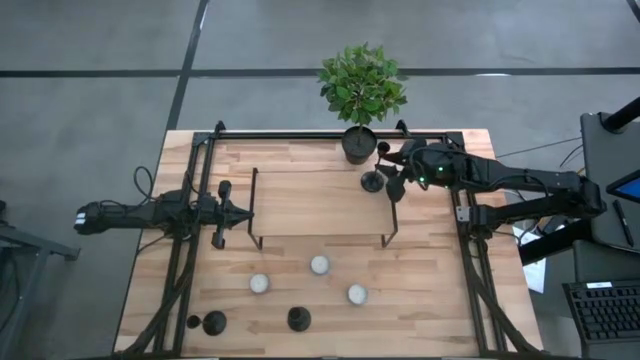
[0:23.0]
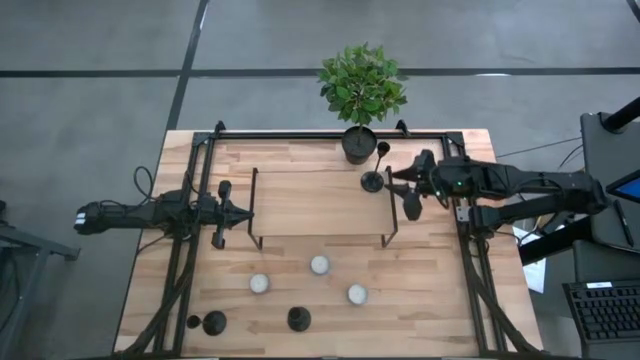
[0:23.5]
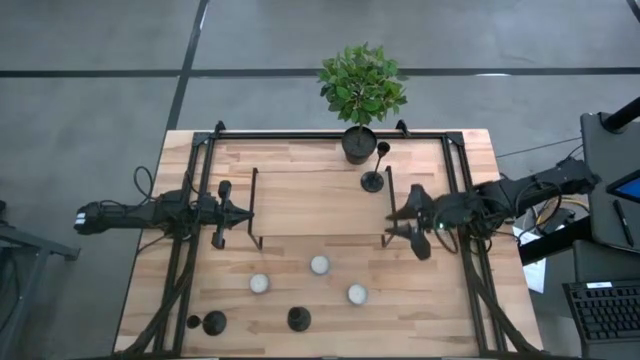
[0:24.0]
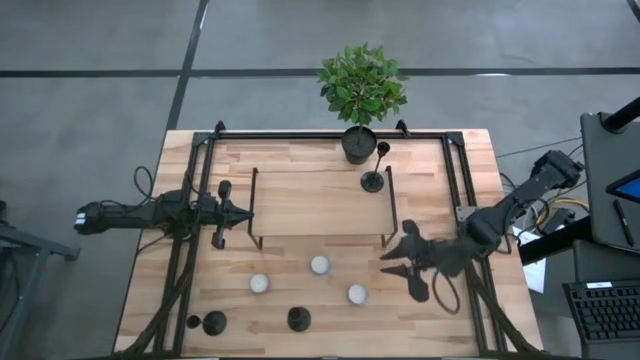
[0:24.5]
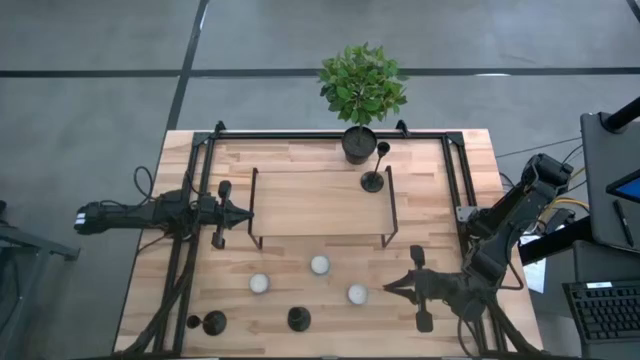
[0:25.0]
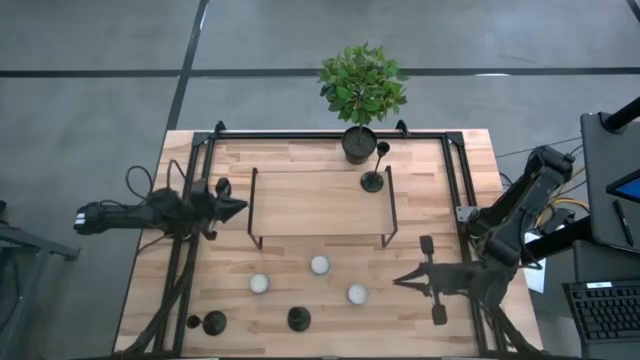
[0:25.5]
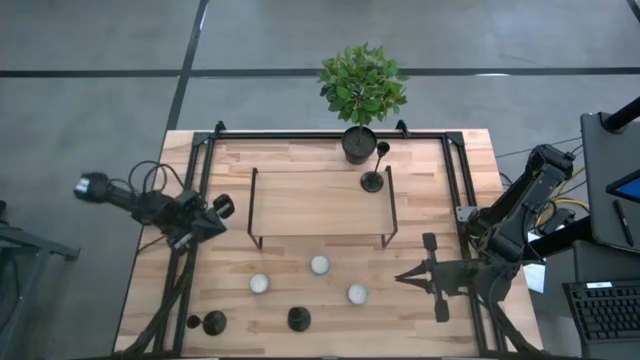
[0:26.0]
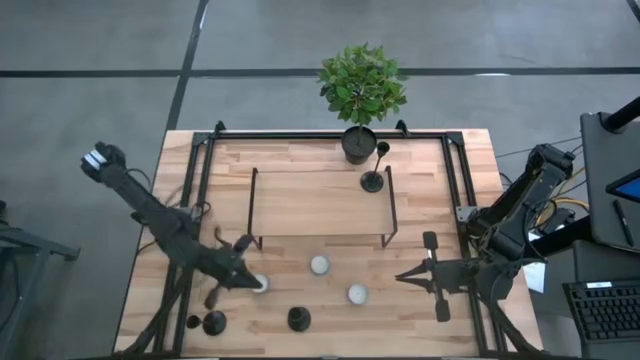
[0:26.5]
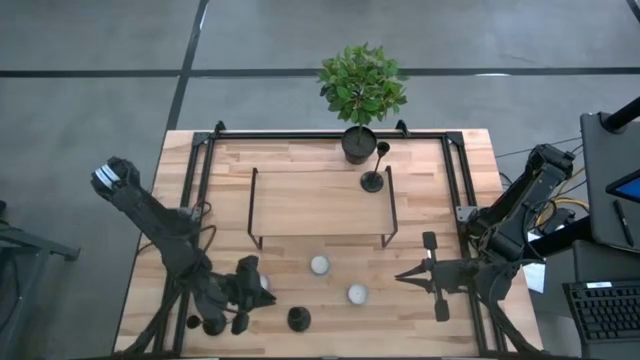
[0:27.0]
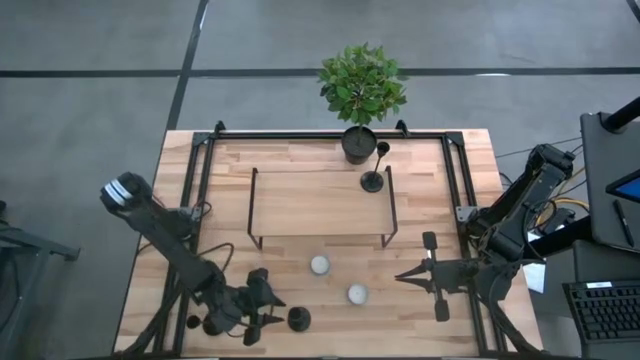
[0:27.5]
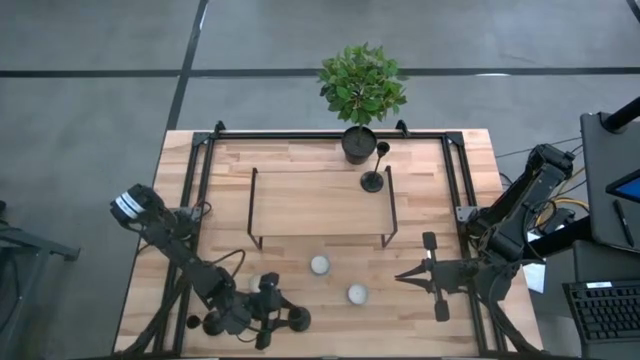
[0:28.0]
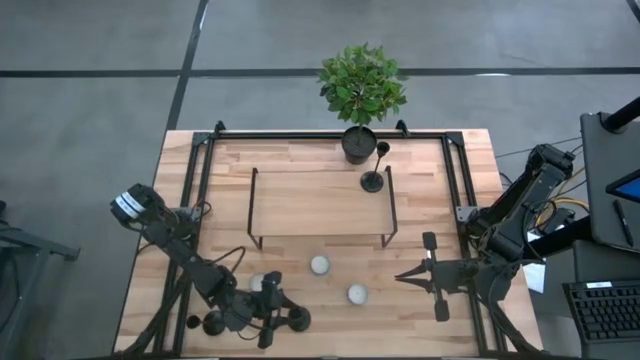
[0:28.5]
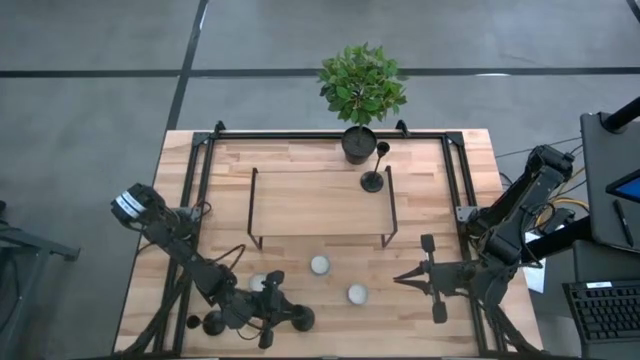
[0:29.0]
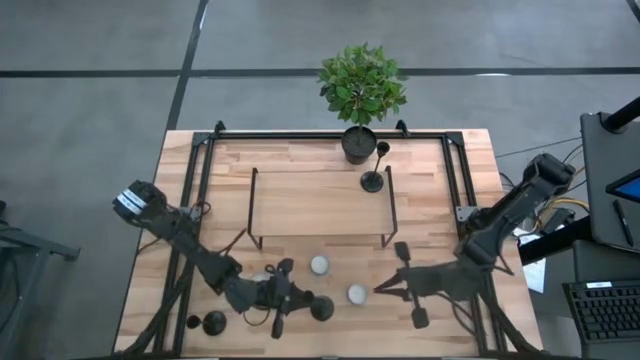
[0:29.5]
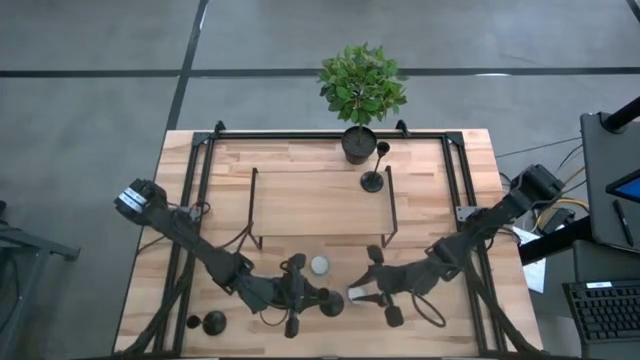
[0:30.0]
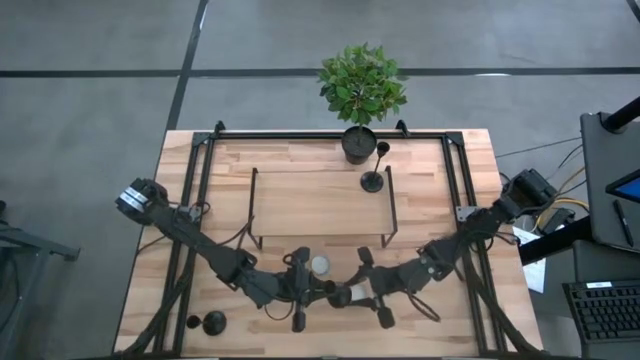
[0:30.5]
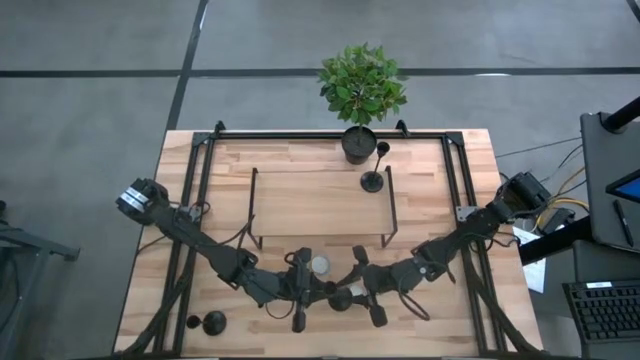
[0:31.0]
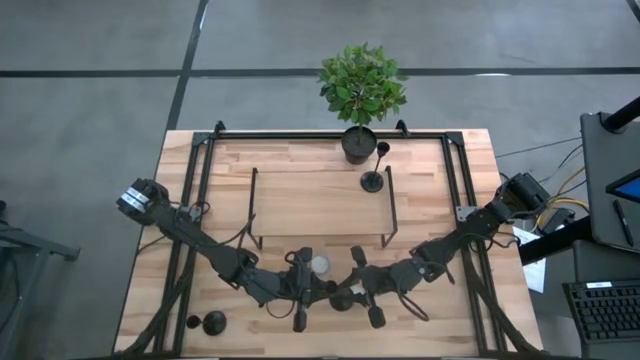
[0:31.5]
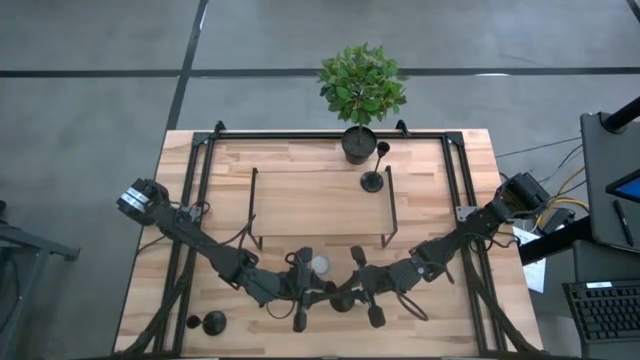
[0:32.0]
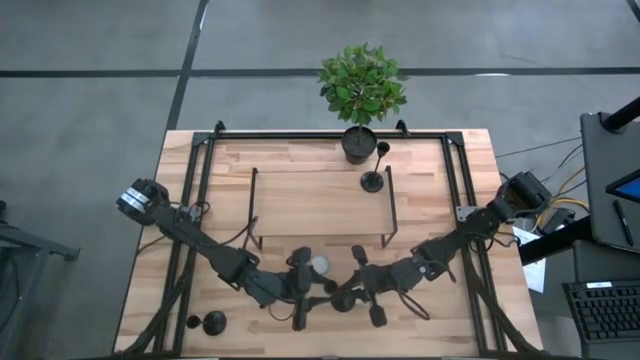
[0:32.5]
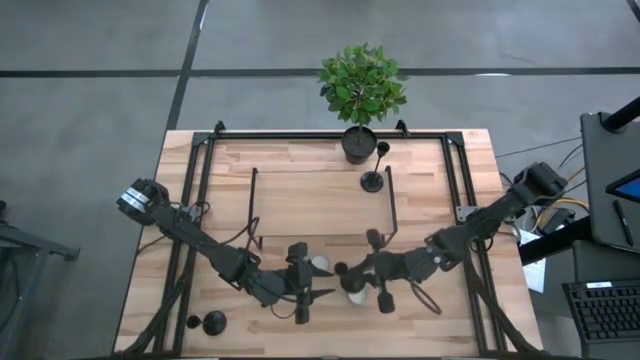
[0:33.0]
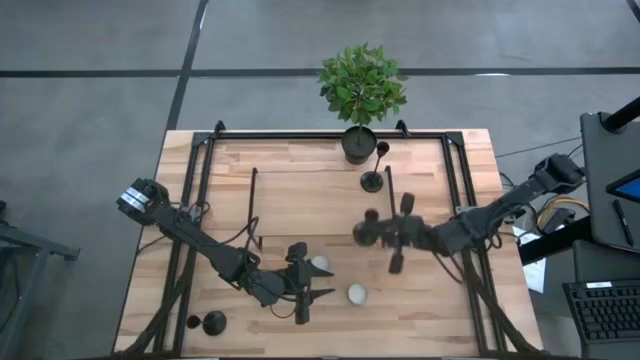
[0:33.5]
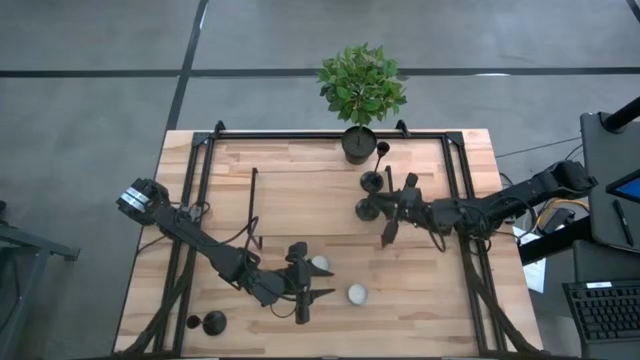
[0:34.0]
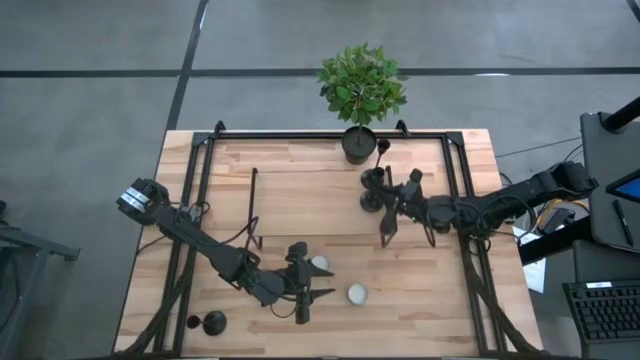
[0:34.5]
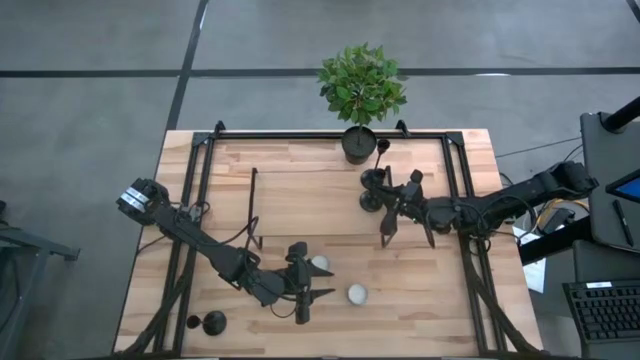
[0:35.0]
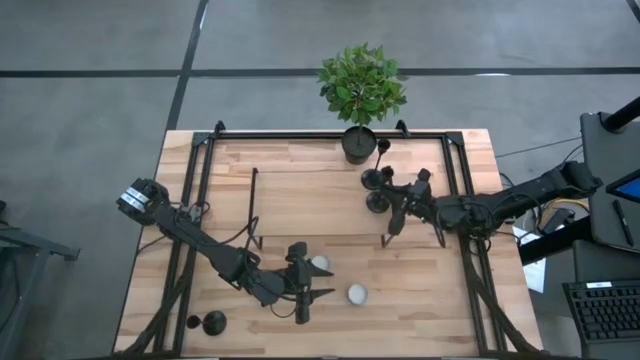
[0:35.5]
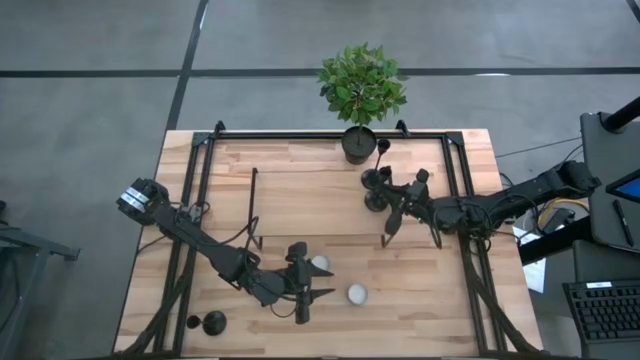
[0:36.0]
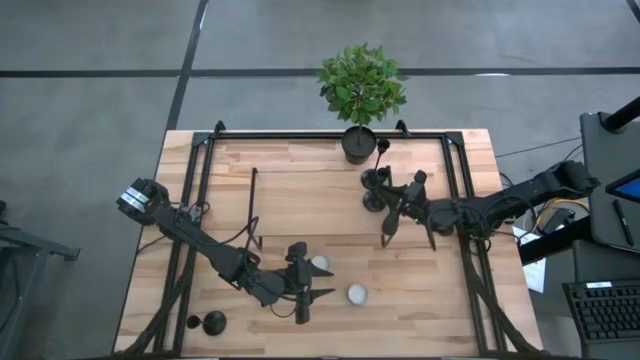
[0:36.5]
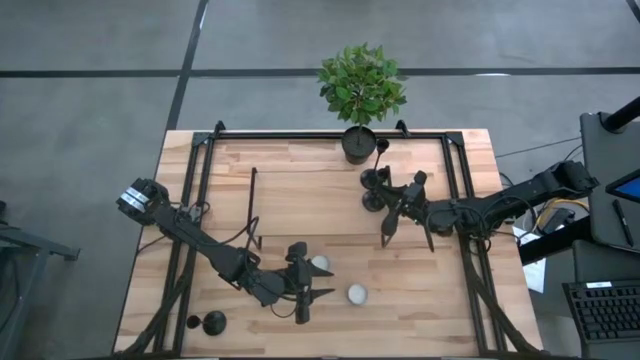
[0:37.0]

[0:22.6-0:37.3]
Task: Pick & Place candle stick holders
Put the right black candle holder on the shelf aligned with the other black candle holder

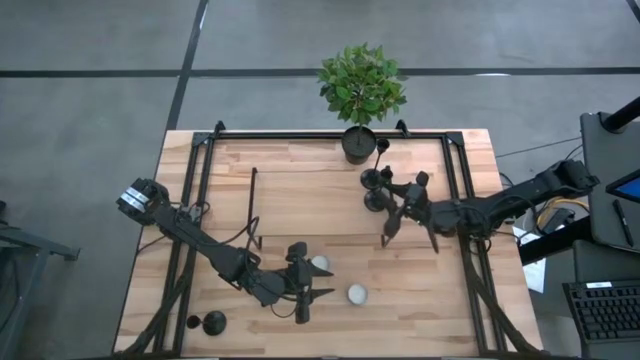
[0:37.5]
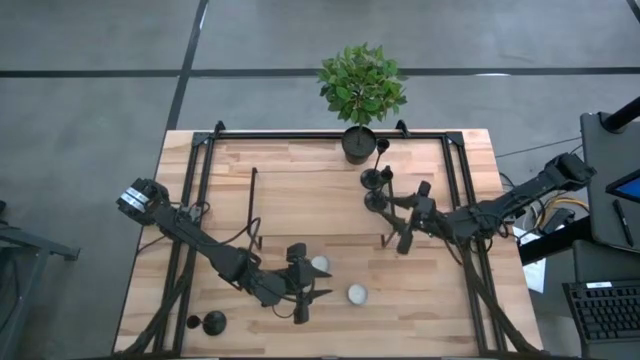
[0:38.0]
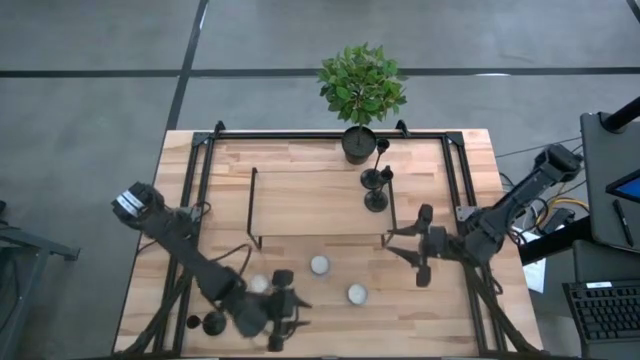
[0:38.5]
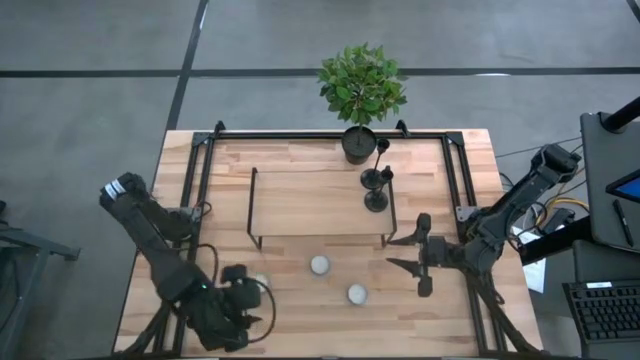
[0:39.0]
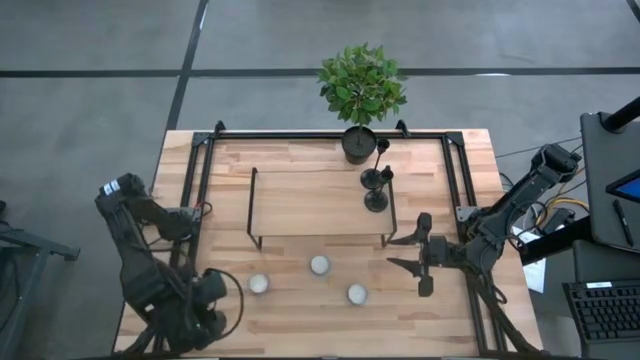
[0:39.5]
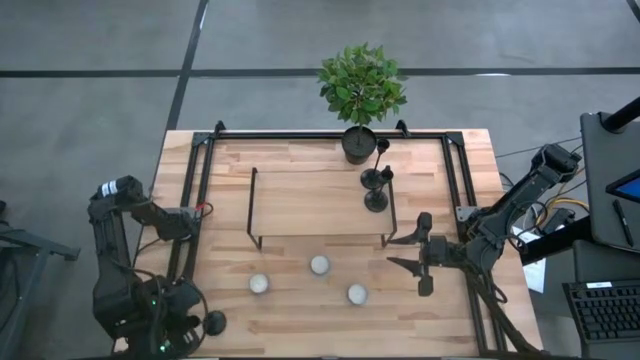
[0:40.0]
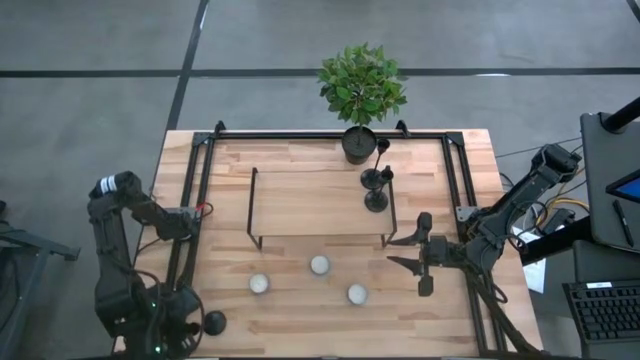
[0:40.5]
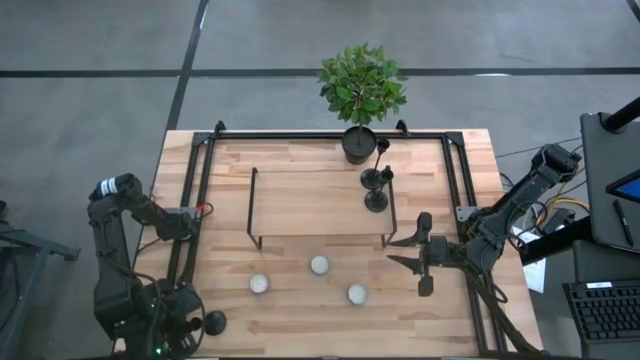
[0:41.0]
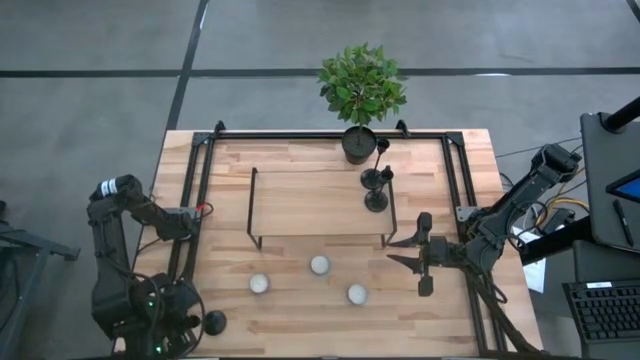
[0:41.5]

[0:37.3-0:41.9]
Put the black candle holder on the shelf aligned with the other black candle holders

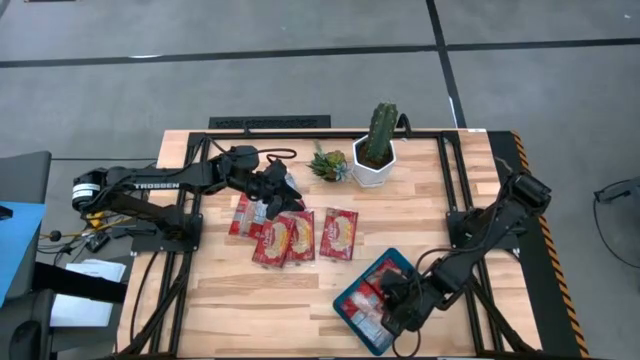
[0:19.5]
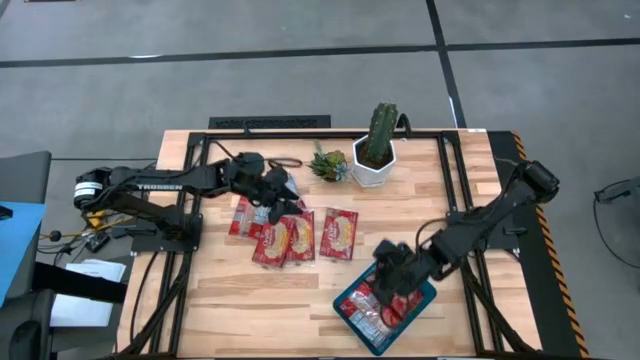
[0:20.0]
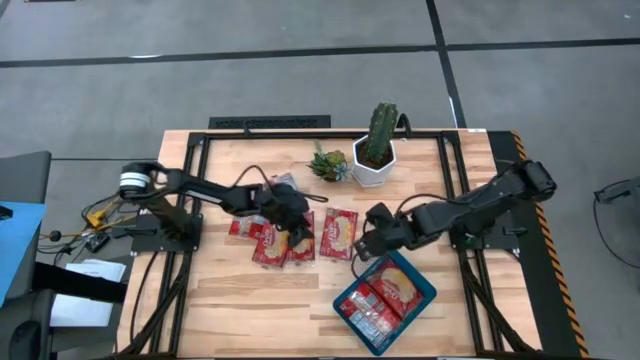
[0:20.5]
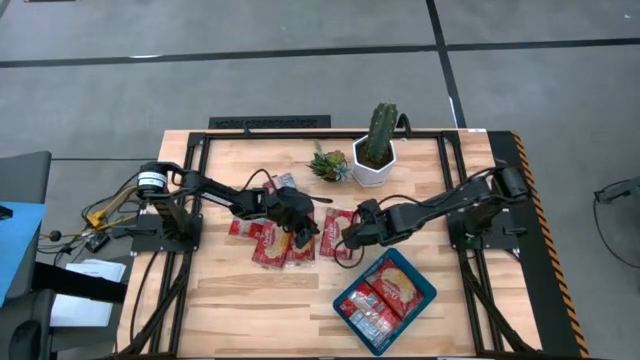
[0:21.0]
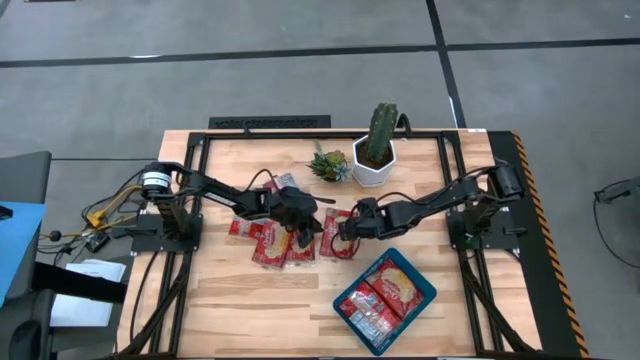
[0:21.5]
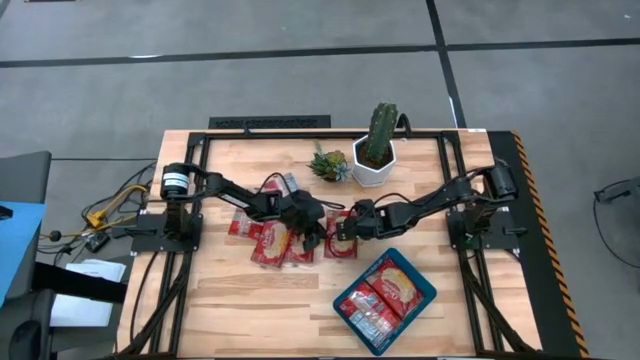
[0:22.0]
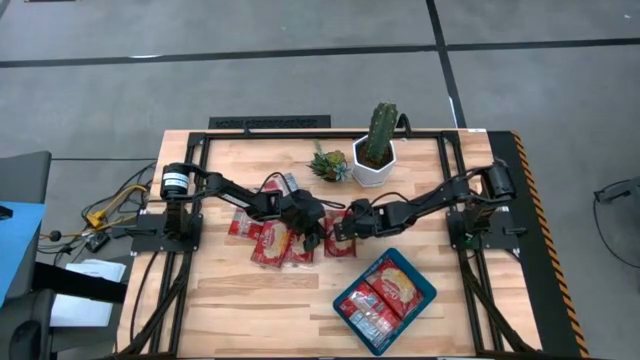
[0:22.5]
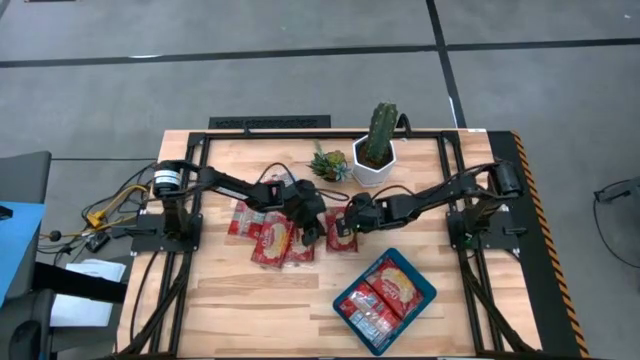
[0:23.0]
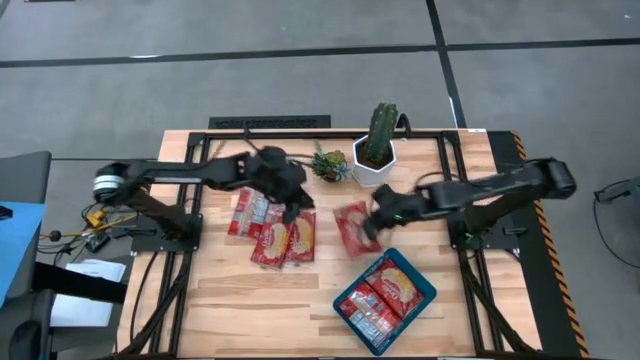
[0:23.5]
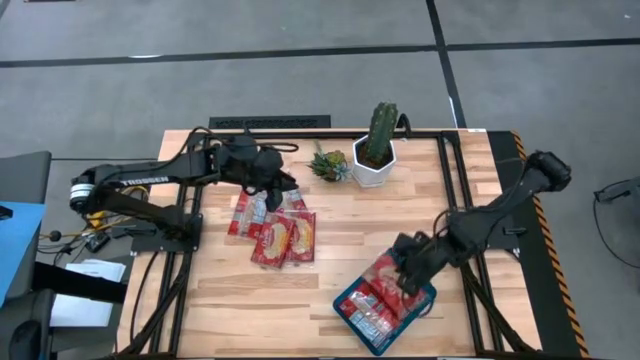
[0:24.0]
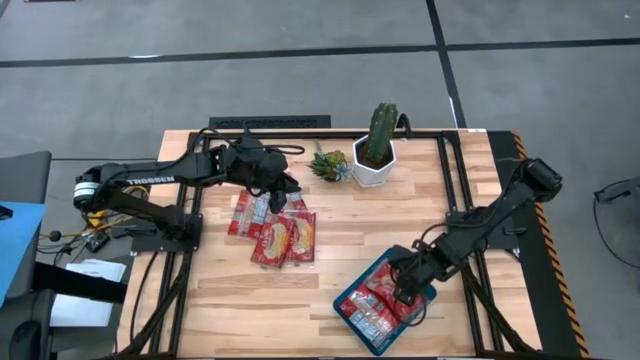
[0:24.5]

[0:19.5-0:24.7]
Task: Sort popcorn bags into baskets
Put the popcorn bag into the bin
